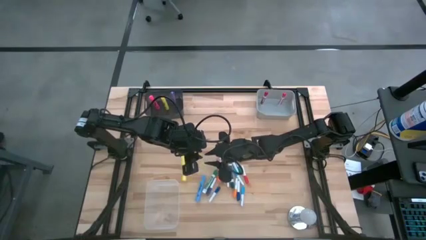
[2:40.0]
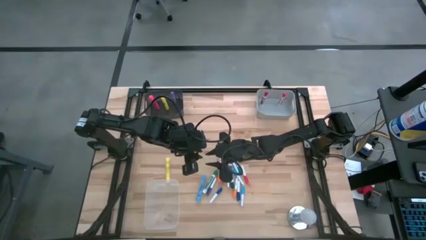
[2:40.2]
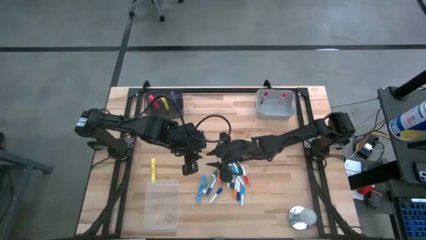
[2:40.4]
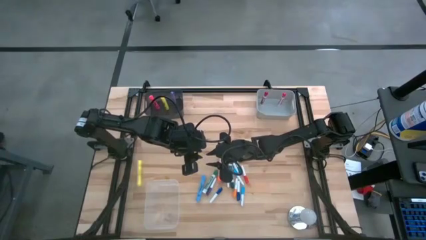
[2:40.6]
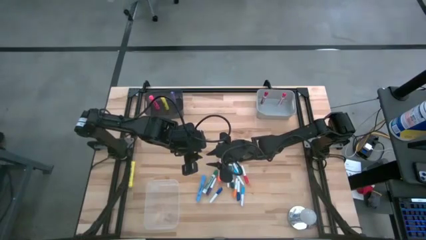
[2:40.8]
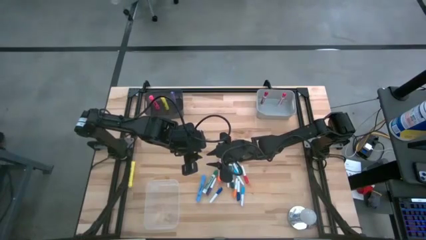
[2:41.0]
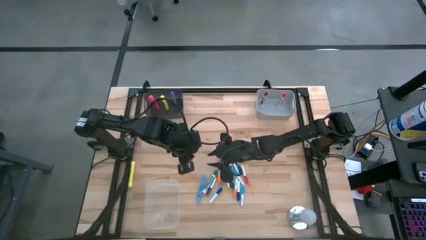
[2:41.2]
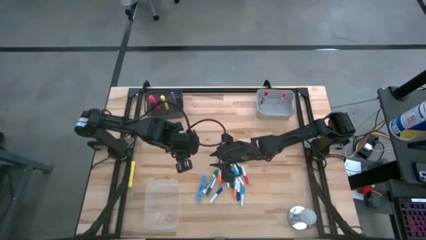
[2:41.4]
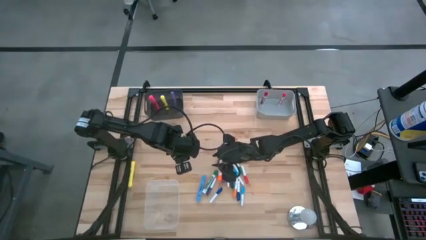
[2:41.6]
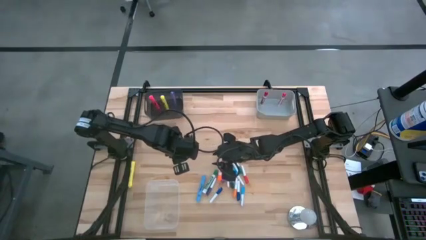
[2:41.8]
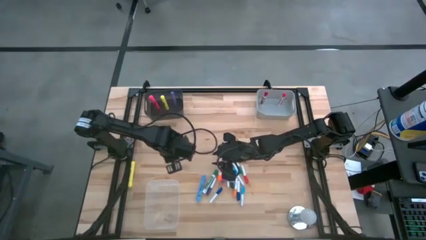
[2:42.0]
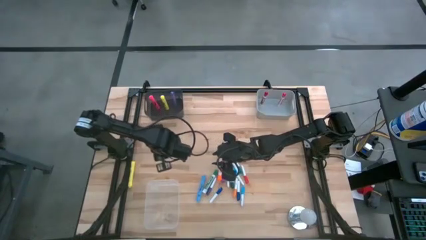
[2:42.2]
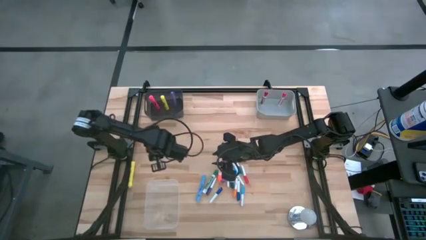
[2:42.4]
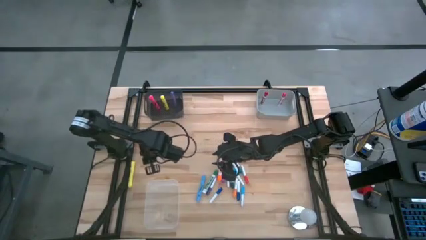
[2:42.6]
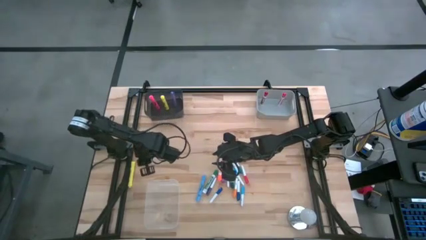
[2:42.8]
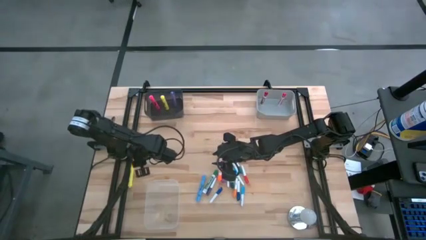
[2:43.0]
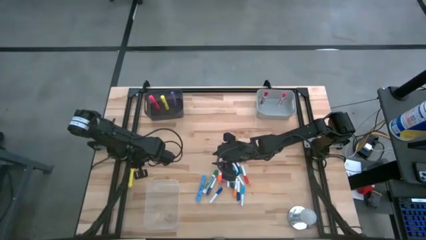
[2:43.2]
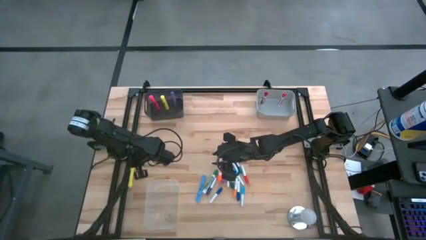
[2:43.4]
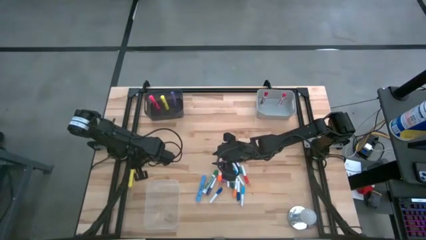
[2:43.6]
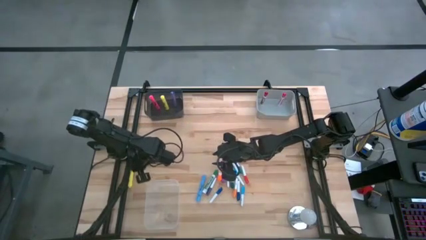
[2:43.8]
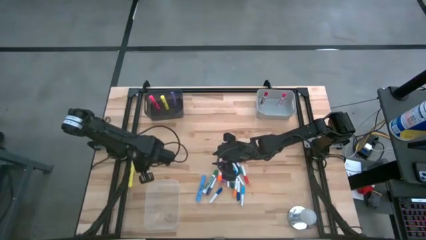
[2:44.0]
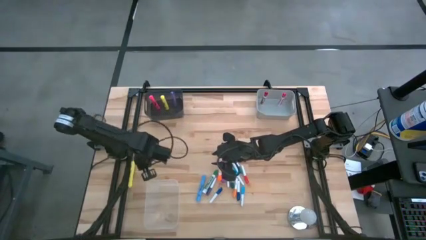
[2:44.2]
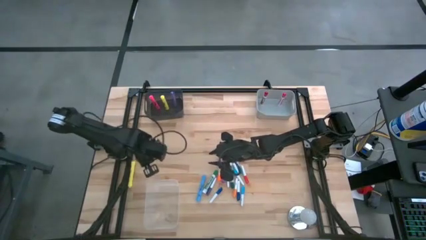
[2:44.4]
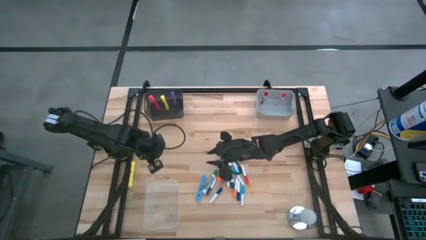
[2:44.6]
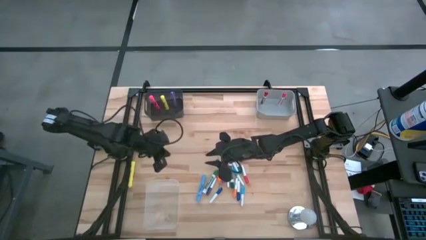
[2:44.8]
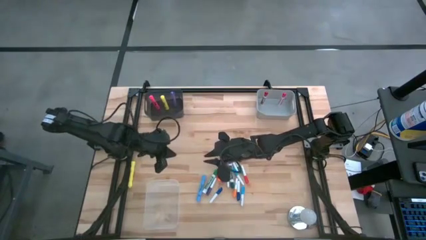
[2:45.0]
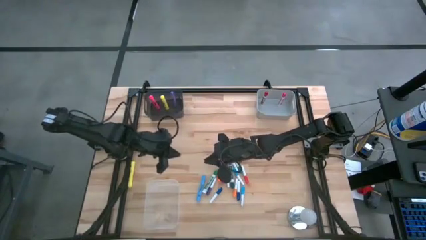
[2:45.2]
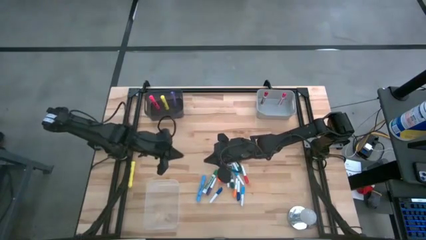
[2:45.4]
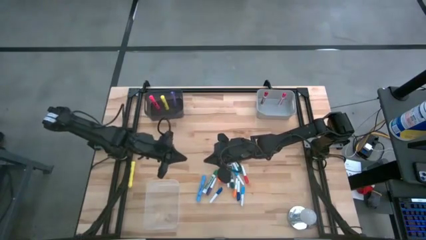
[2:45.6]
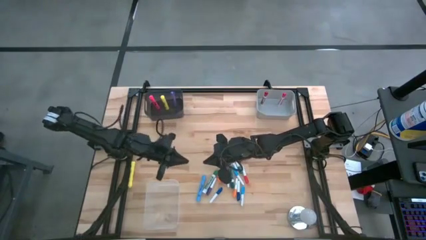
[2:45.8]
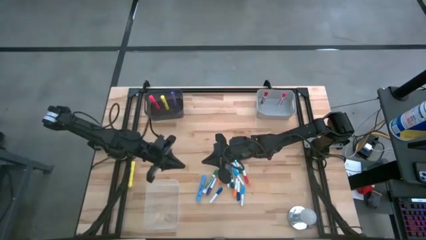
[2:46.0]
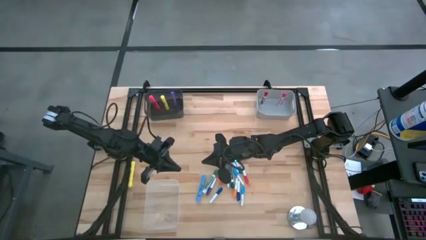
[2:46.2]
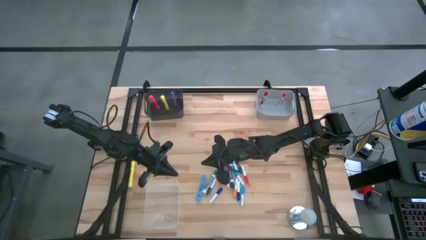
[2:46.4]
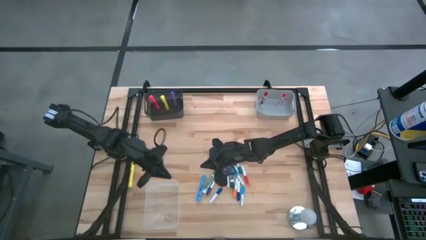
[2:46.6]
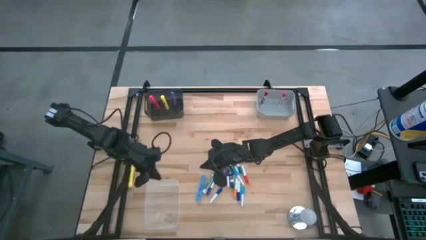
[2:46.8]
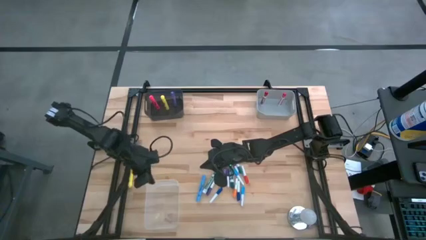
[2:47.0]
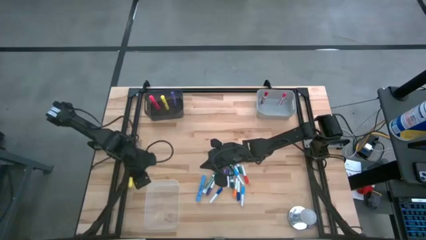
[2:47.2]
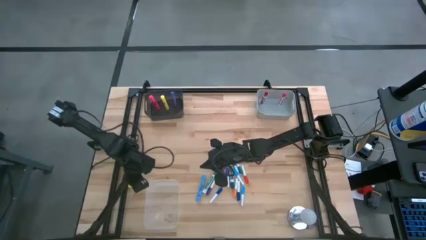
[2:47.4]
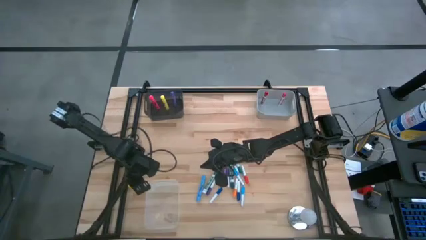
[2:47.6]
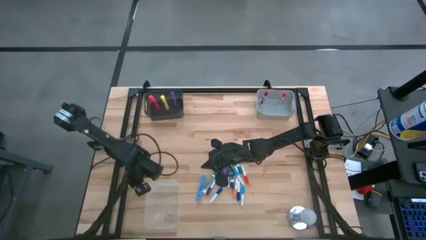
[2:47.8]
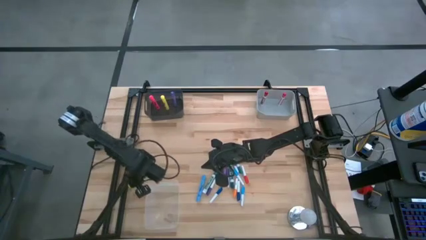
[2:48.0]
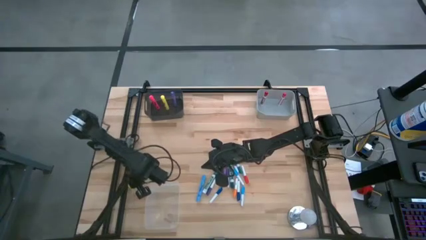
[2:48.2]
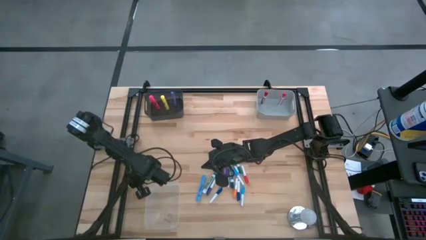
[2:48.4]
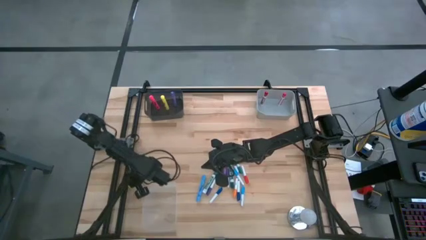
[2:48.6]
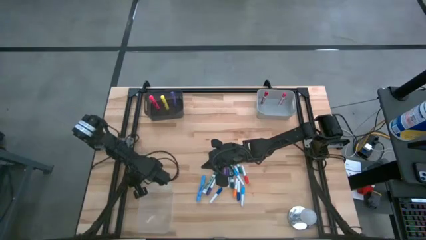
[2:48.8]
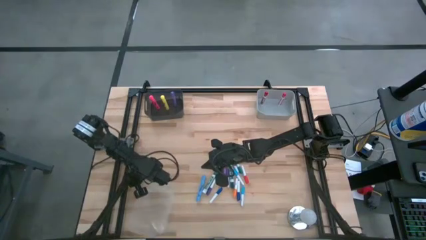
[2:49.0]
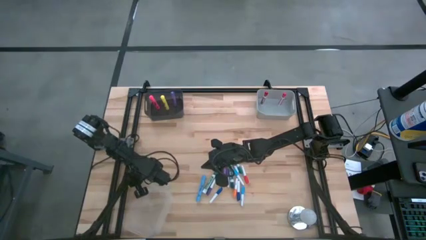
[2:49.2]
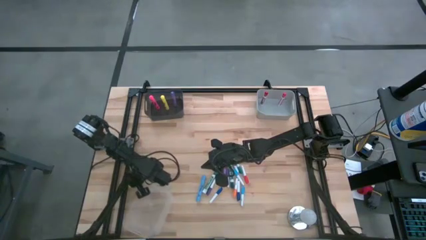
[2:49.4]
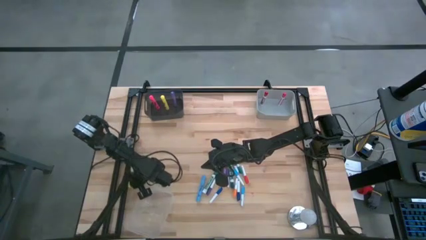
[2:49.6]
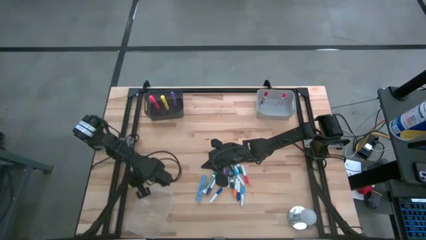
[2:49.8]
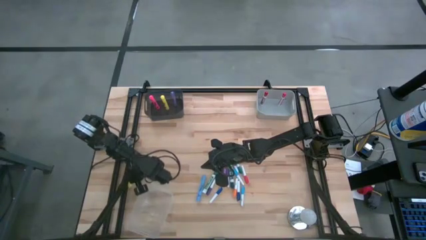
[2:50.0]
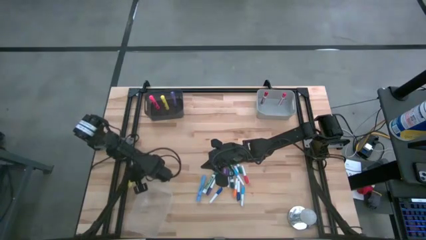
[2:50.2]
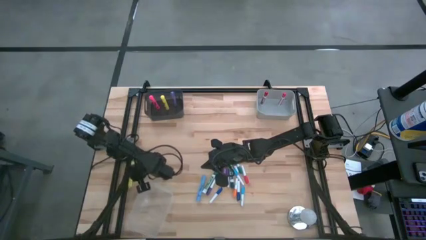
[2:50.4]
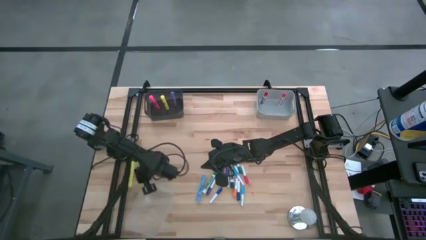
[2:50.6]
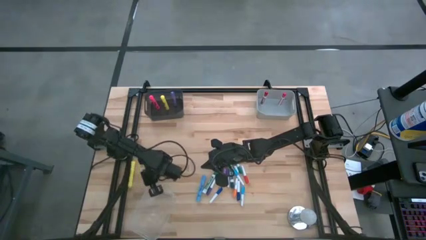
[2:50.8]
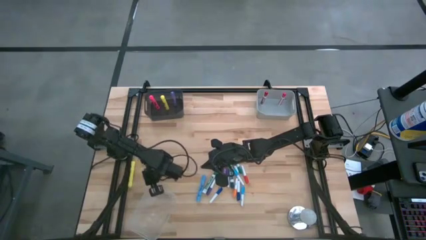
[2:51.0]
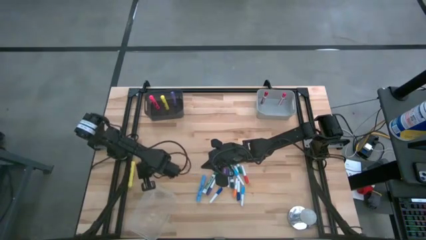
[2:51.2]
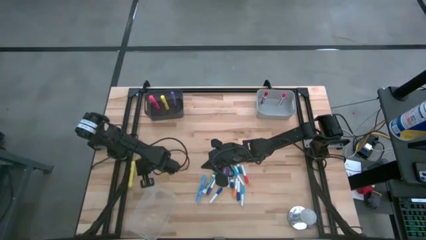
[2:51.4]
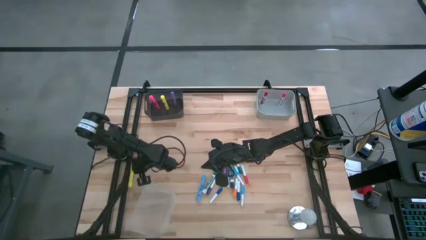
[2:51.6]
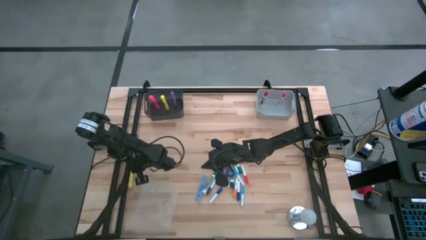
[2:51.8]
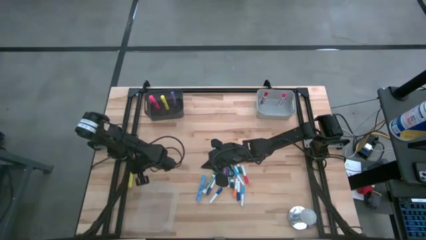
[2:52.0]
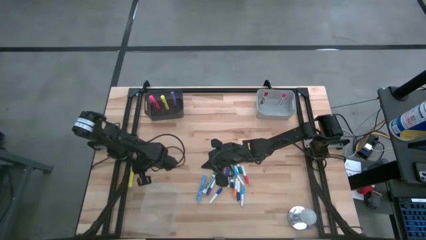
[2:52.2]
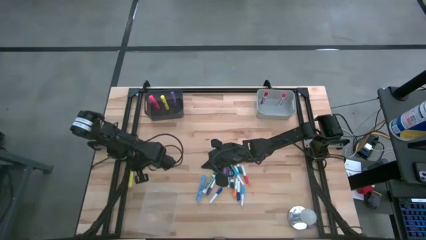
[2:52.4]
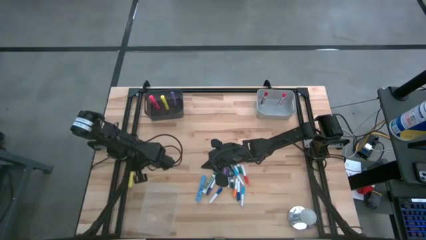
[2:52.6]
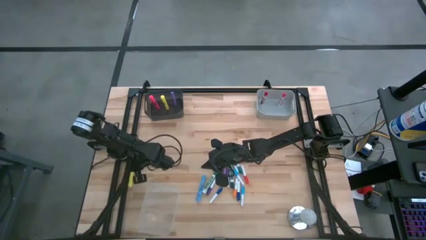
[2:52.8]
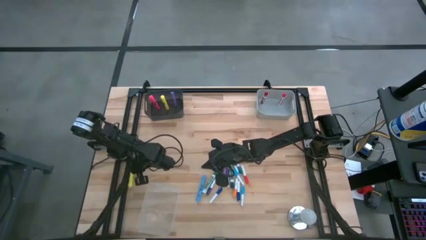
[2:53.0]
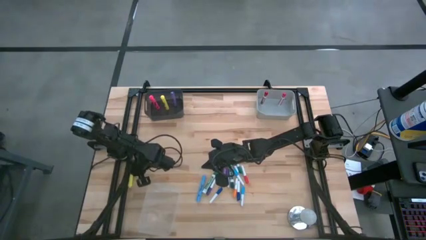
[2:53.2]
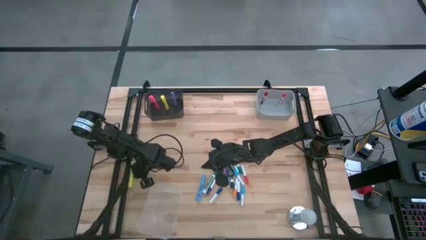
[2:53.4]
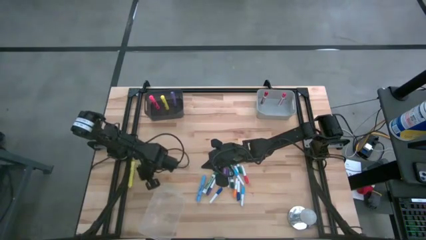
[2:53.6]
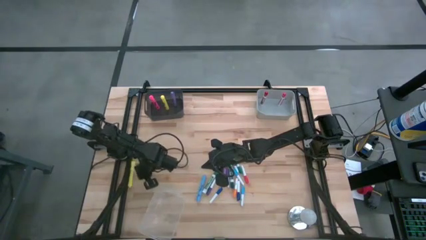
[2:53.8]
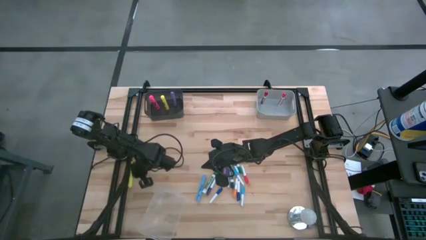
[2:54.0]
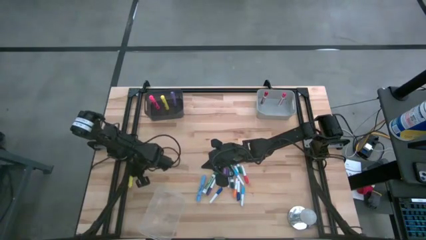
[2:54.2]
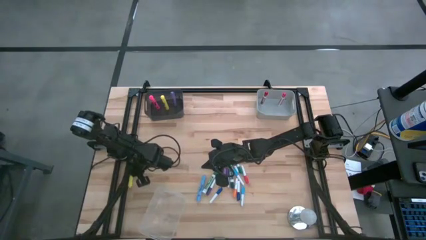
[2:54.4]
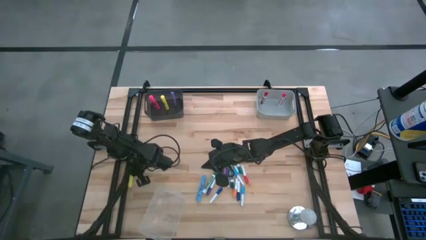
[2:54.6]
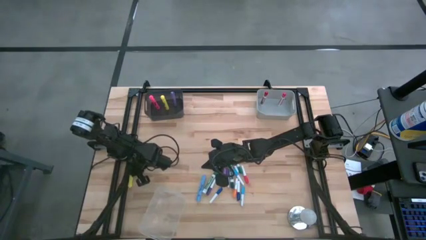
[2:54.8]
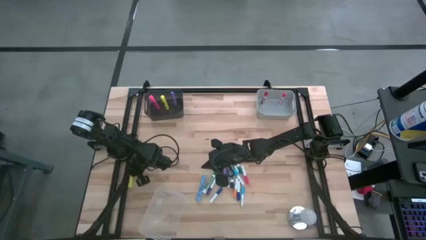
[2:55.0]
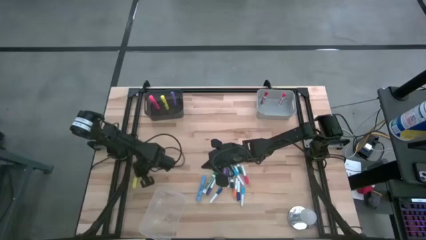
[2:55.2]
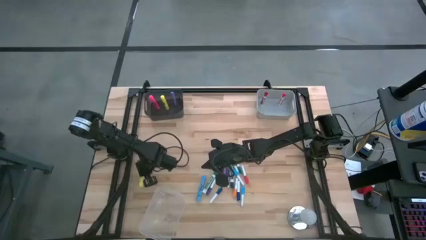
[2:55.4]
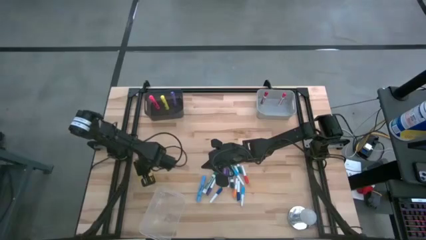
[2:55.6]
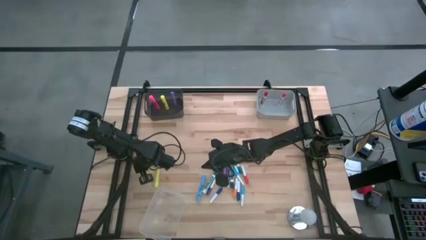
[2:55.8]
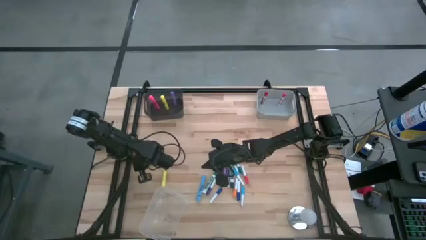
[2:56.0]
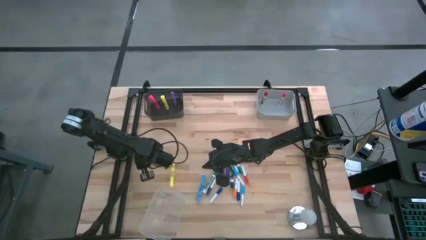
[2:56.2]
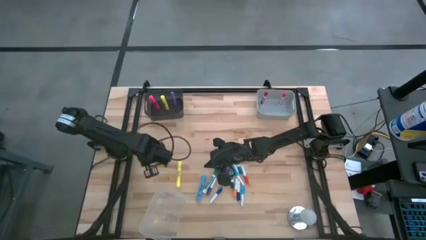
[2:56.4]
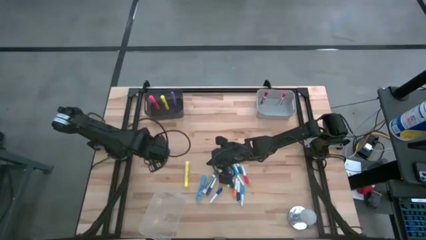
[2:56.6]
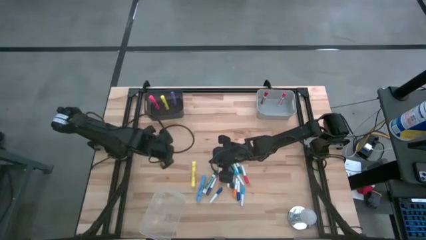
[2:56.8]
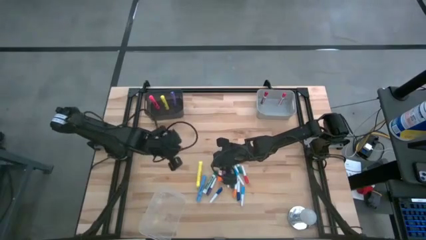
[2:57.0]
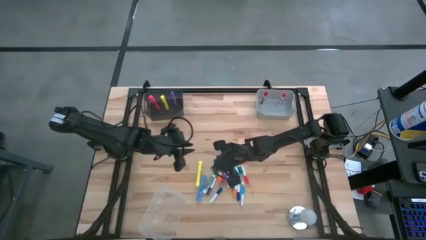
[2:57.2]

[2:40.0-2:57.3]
Task: Pick & Place Markers
Put the yellow highlighter pen into the black bin
